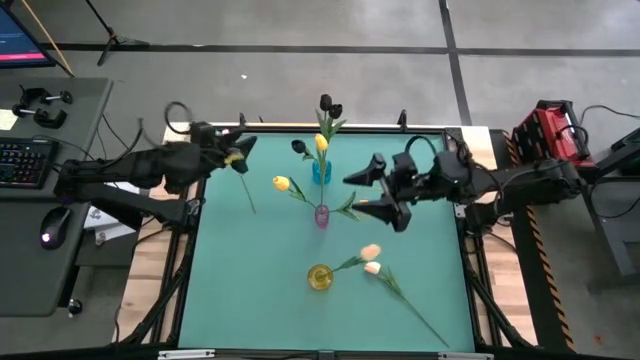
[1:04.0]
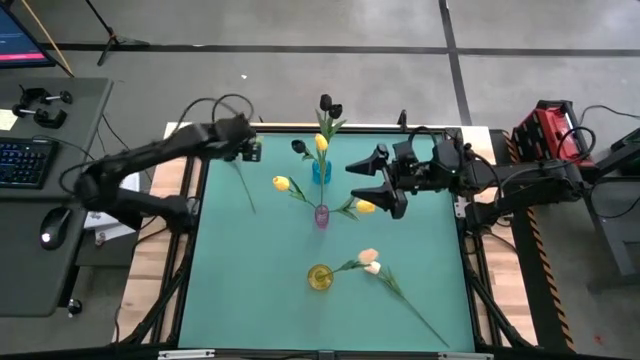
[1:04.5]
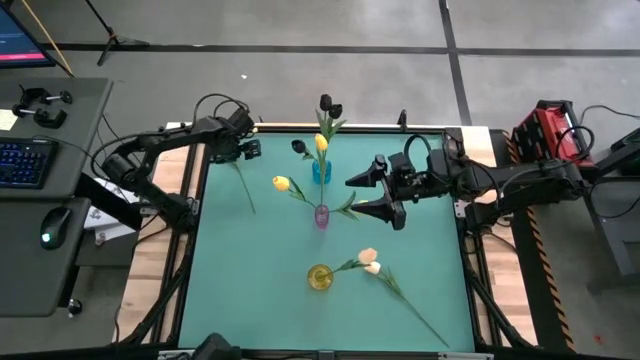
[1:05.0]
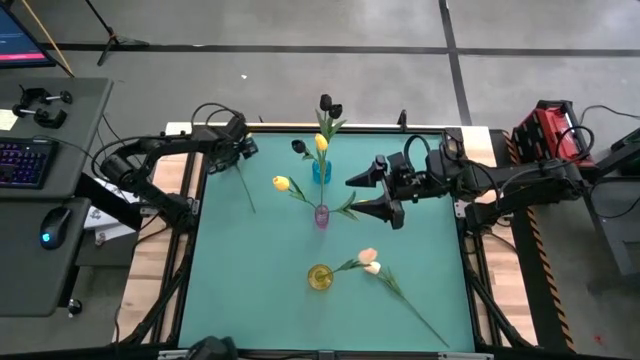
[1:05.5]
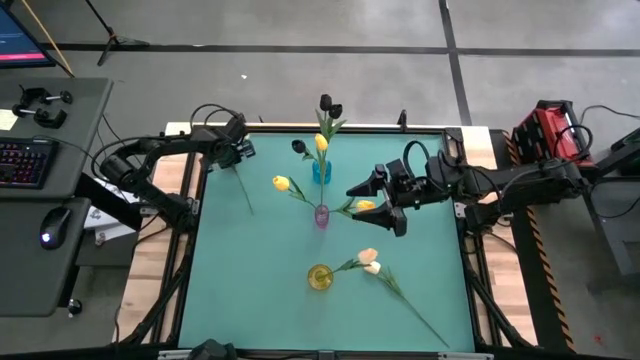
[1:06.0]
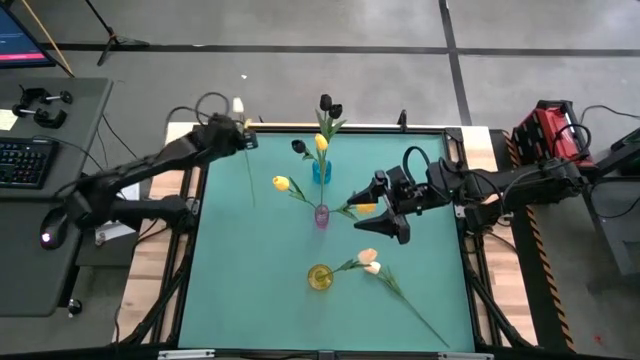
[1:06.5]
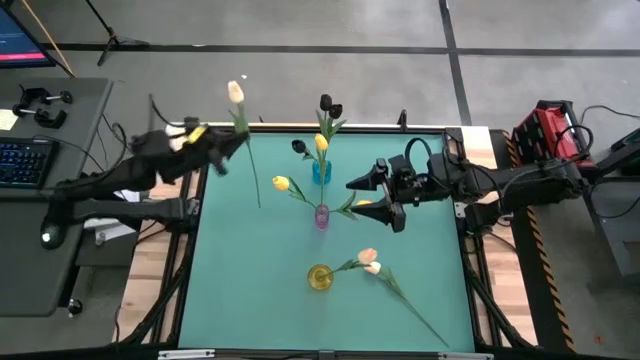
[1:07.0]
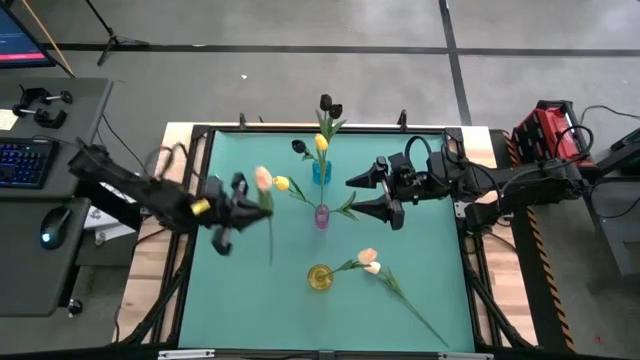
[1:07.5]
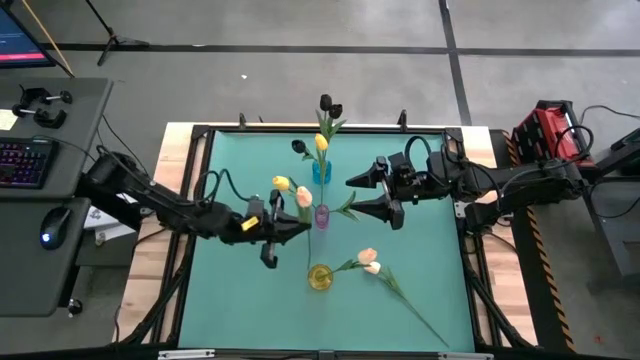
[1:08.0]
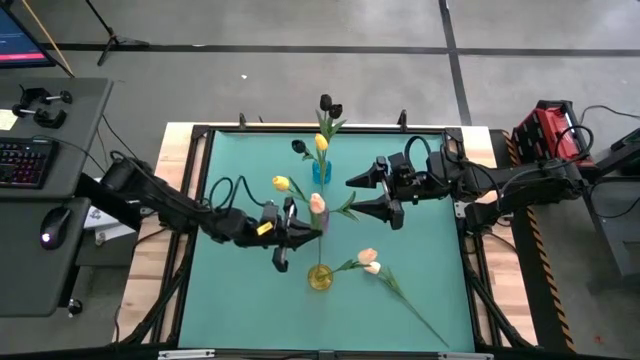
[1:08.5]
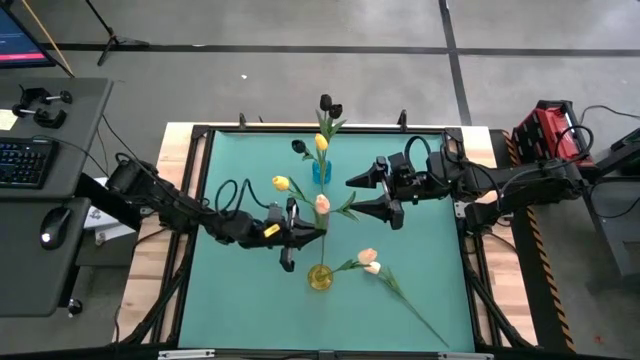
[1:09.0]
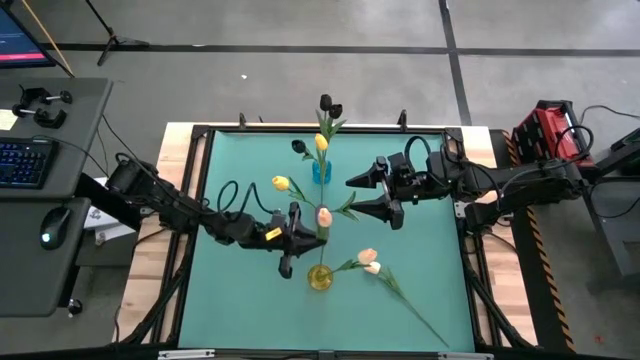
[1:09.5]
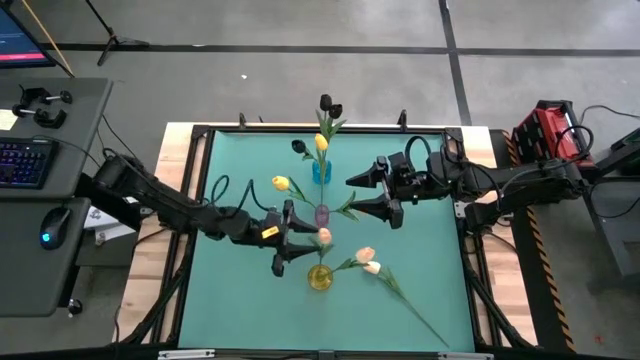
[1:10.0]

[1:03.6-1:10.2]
Task: Sort flowers into vase by color
Put the top white tulip into the yellow vase

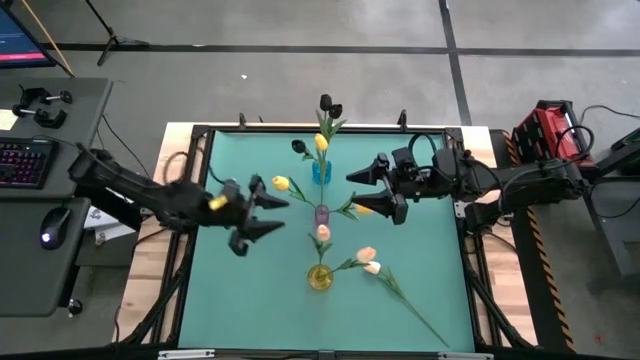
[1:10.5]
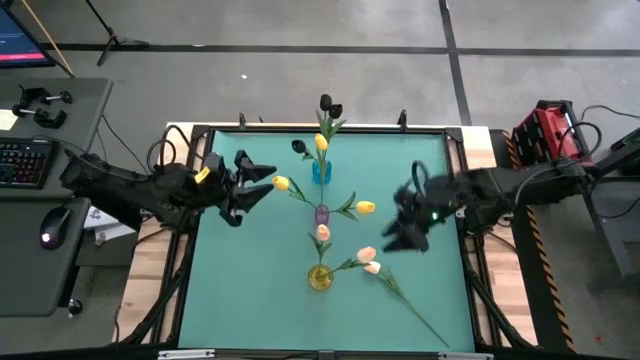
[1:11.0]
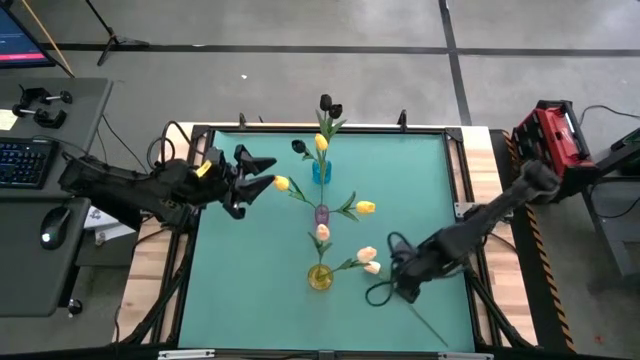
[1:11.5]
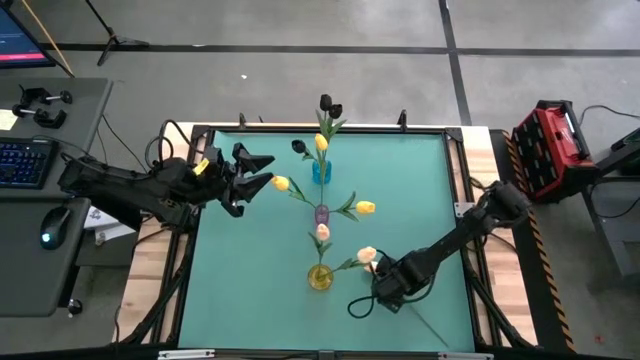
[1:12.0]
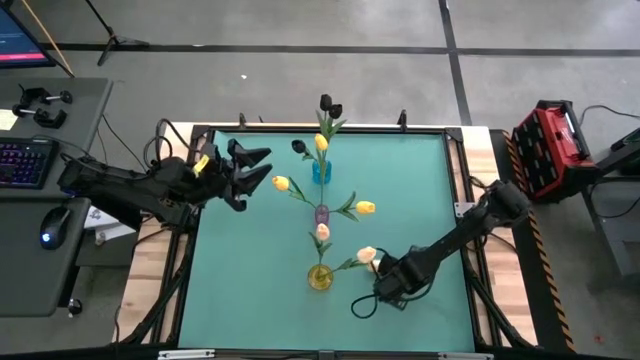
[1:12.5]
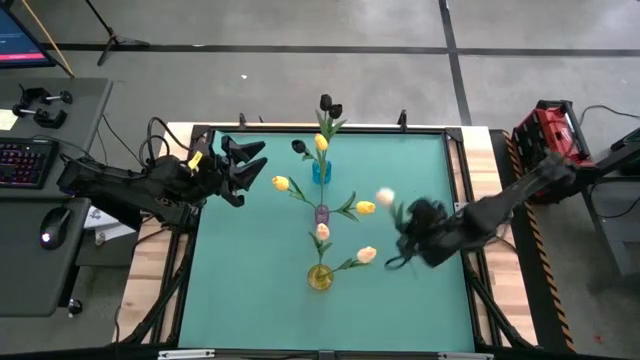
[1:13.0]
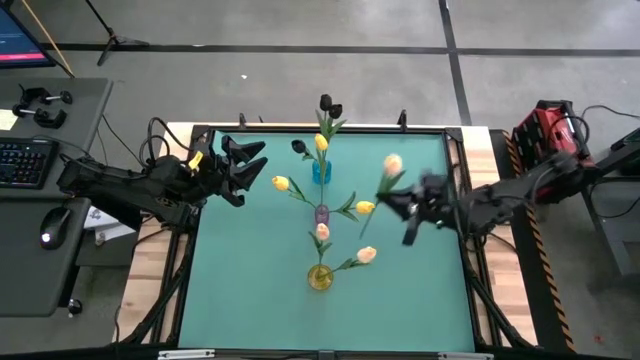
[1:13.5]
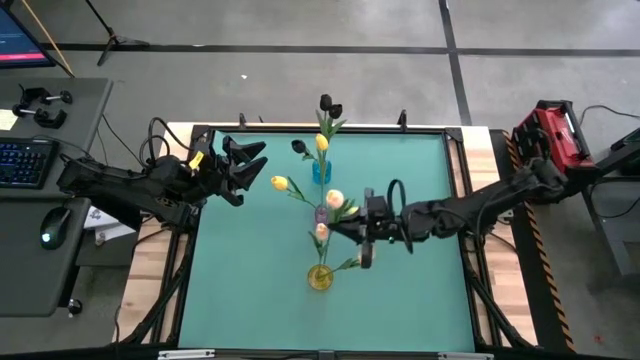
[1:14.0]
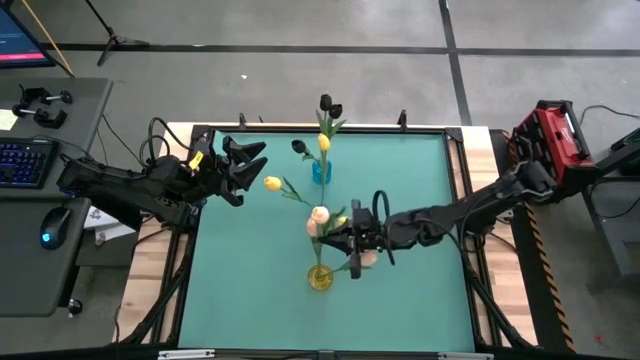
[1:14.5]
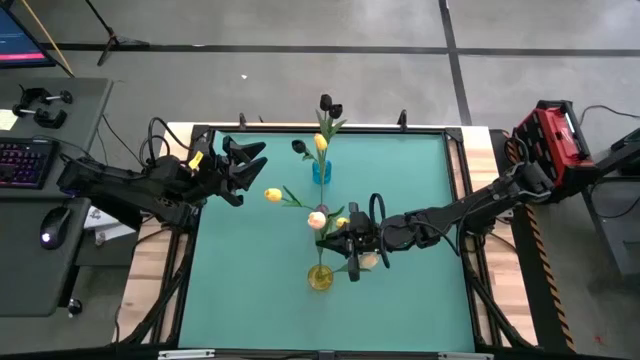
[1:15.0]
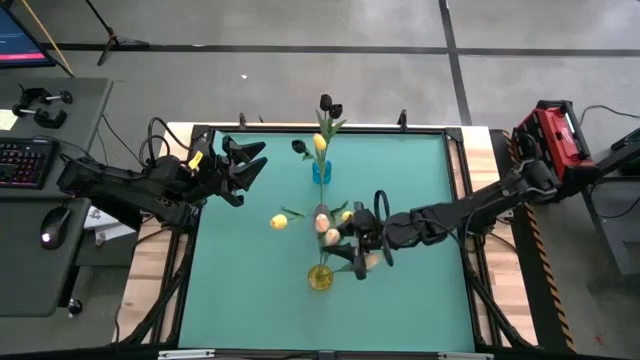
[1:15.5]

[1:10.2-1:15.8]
Put the white tulip into the yellow vase

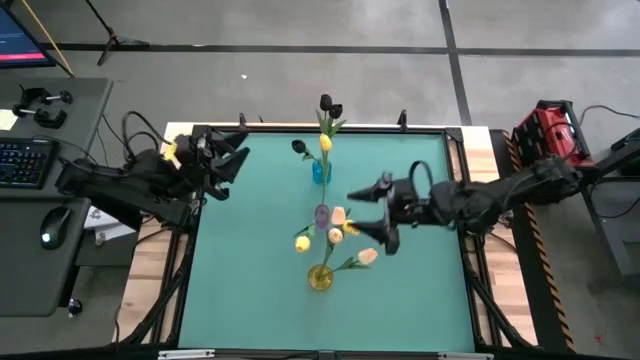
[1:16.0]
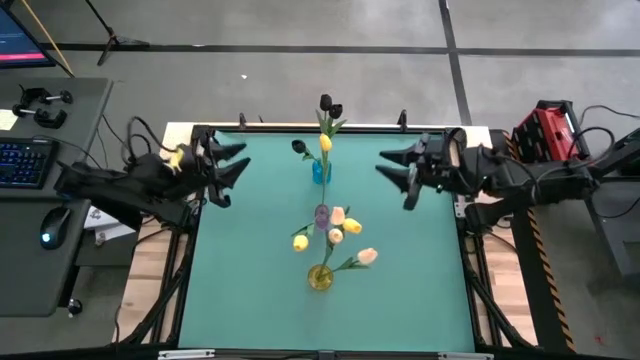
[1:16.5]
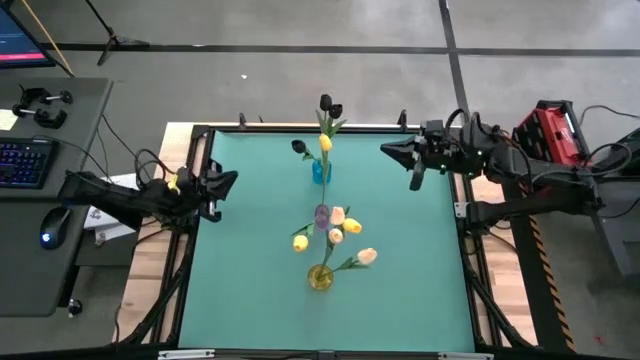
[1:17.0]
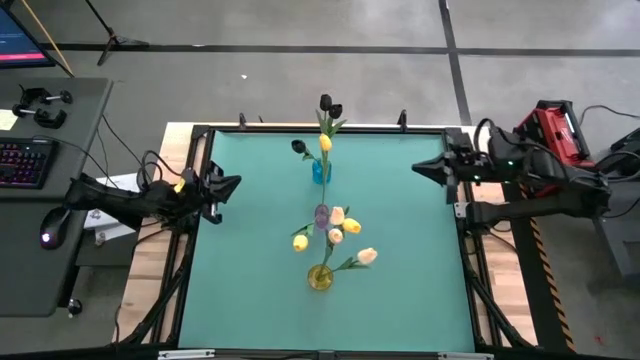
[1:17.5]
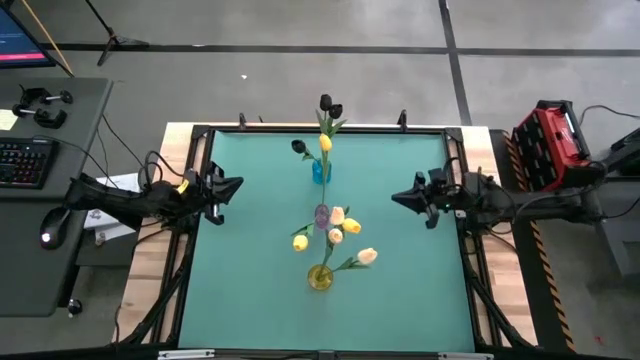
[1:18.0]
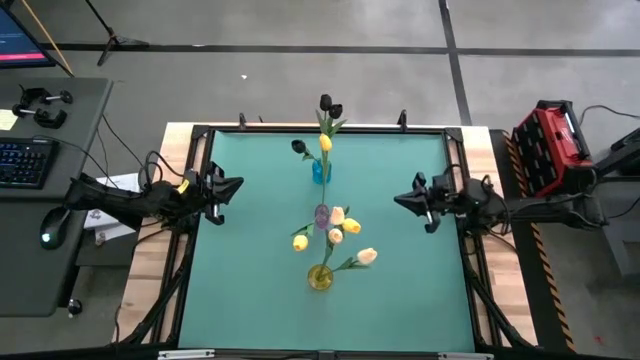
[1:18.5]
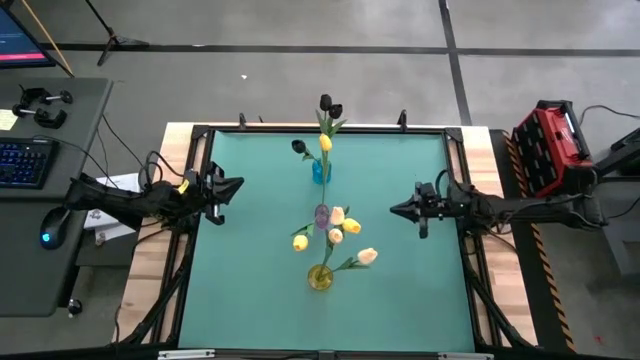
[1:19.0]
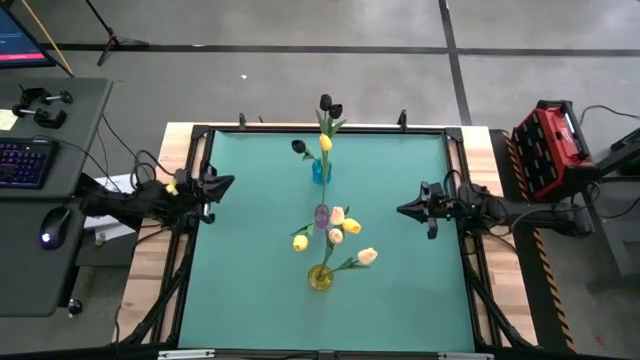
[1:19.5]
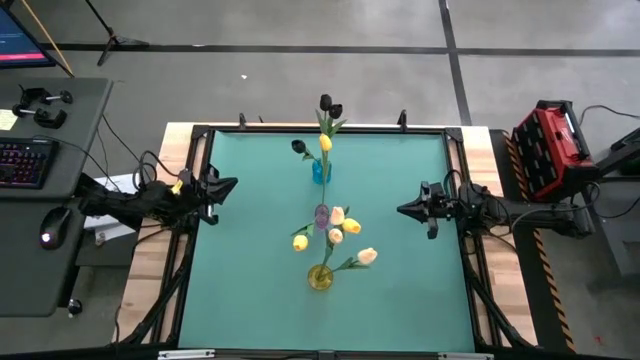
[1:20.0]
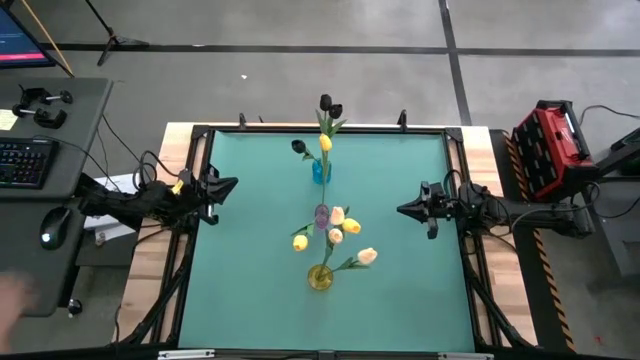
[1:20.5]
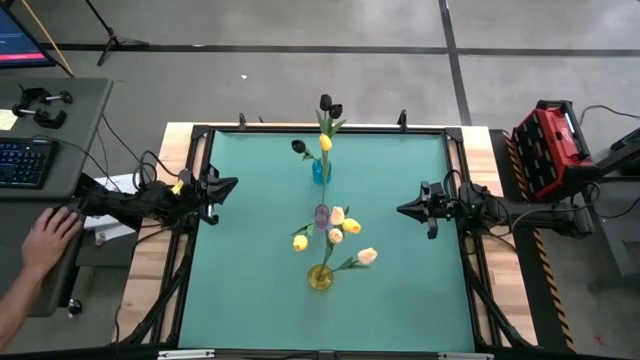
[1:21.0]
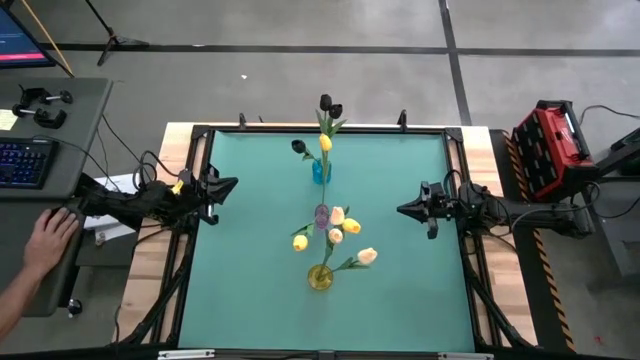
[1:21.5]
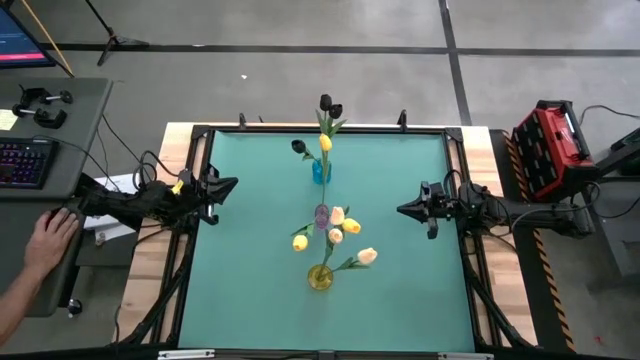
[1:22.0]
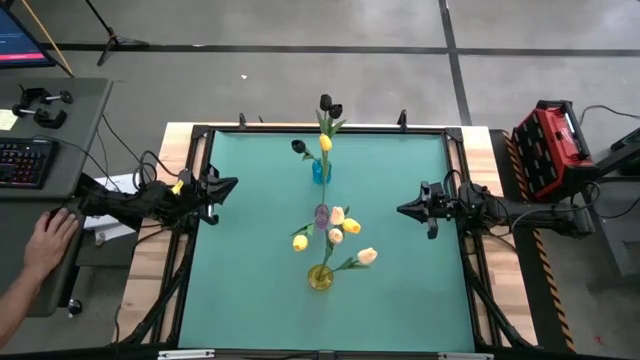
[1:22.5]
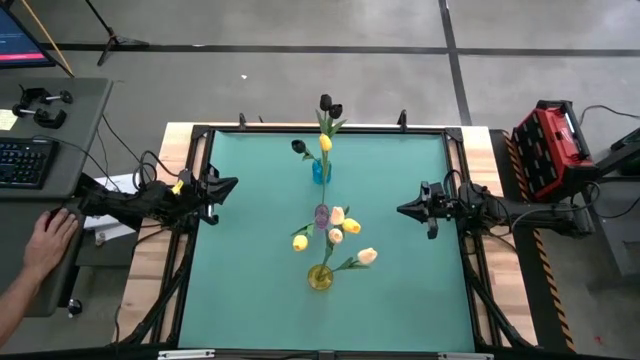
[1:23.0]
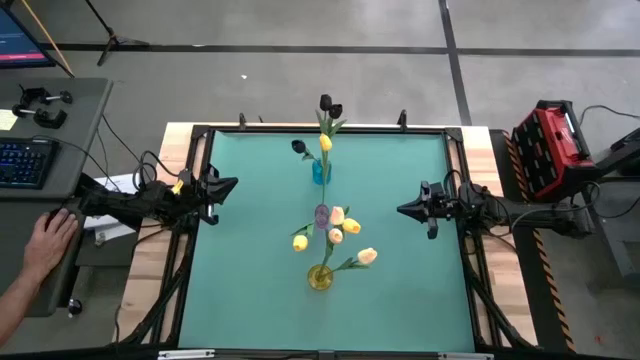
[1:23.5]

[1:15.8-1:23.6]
Return to Home Position

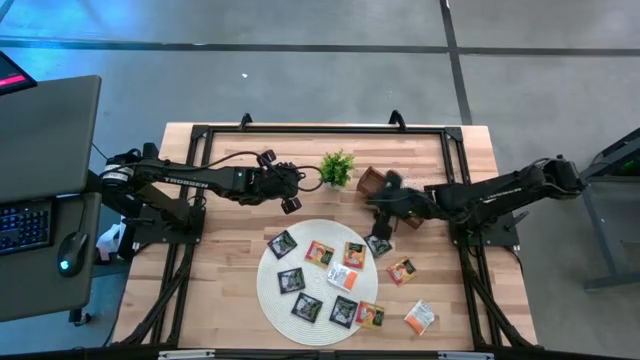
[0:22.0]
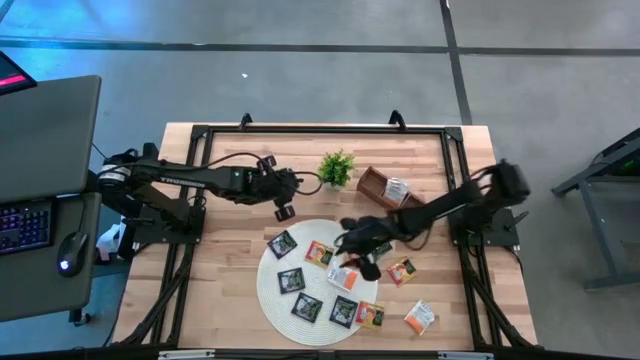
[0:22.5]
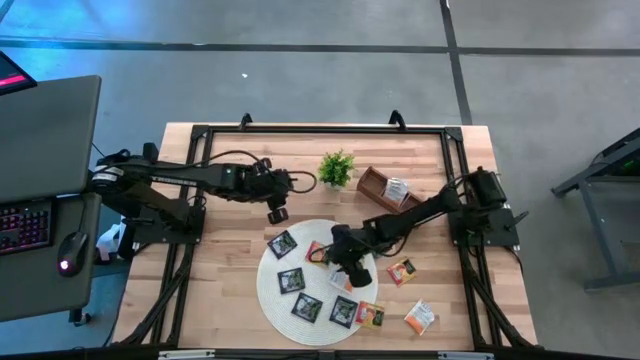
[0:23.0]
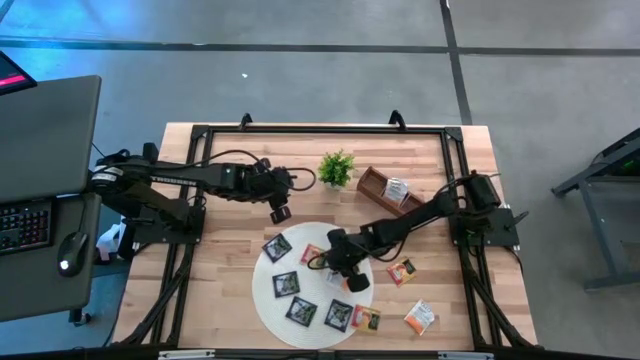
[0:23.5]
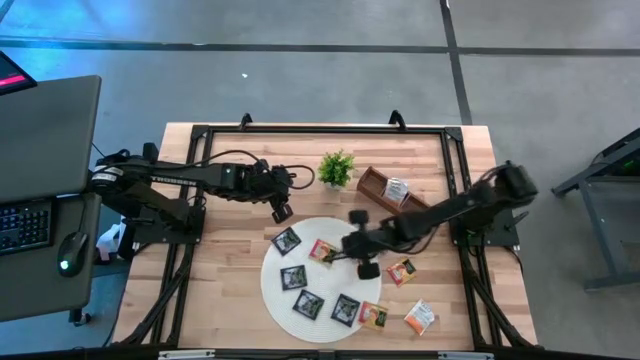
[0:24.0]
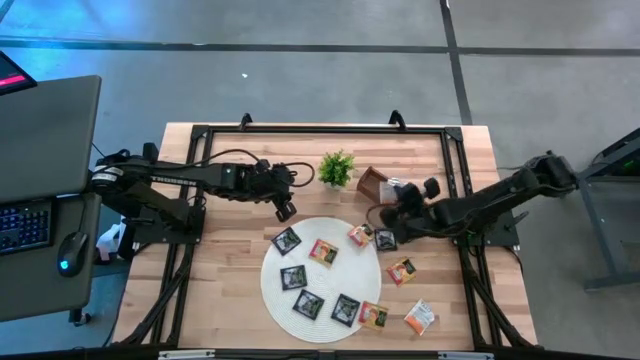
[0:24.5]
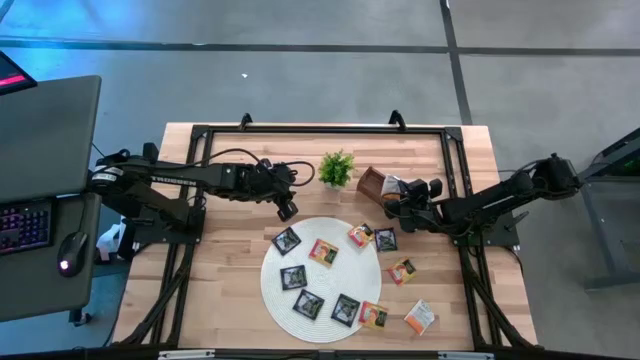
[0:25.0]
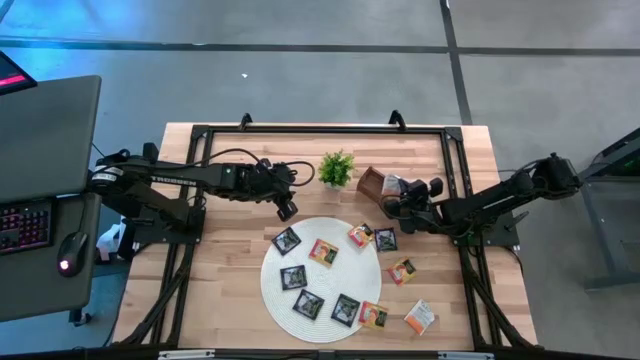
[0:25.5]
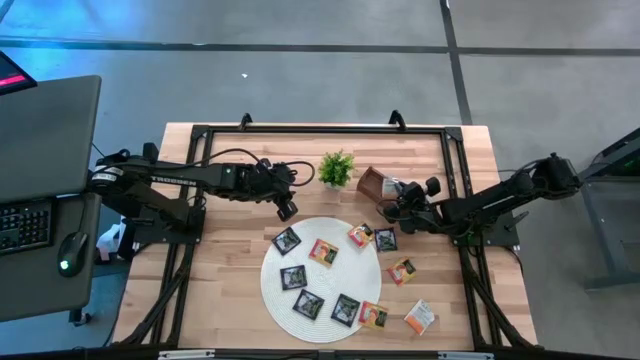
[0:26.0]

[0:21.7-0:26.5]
Task: Pick & Place Tea
Put the white tea bag into the middle section of the wooden organizer
